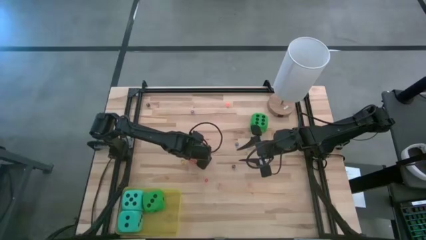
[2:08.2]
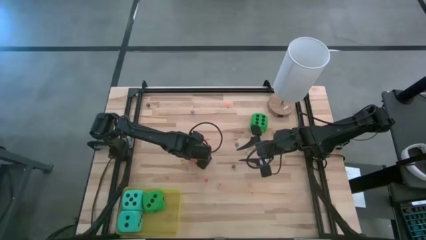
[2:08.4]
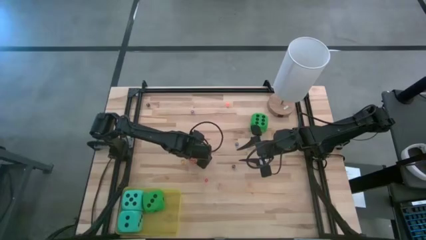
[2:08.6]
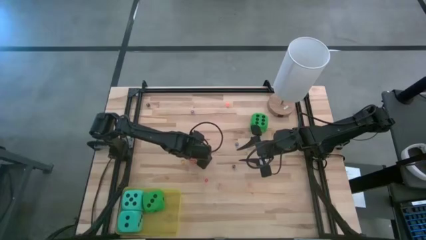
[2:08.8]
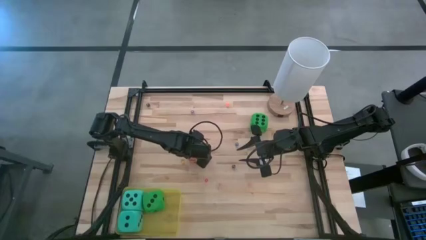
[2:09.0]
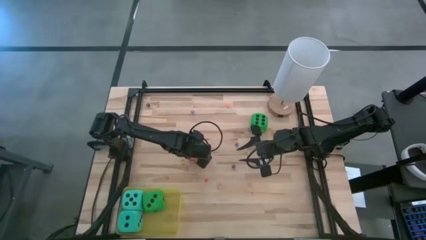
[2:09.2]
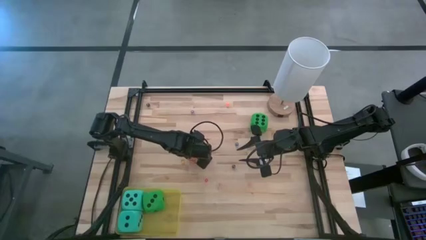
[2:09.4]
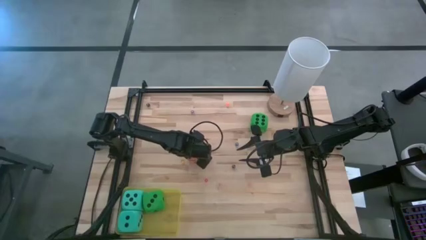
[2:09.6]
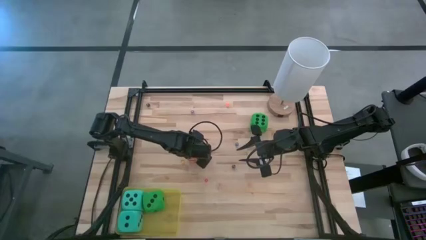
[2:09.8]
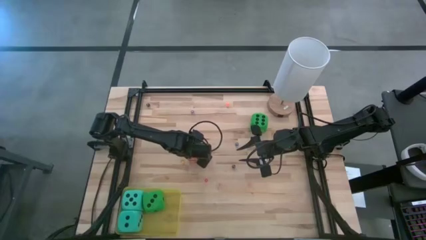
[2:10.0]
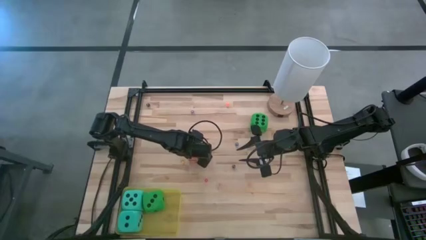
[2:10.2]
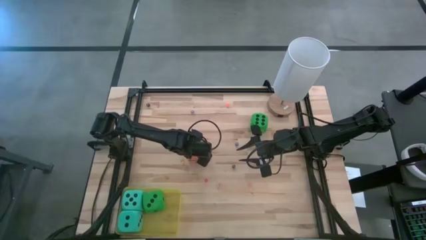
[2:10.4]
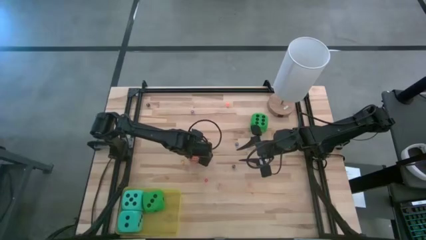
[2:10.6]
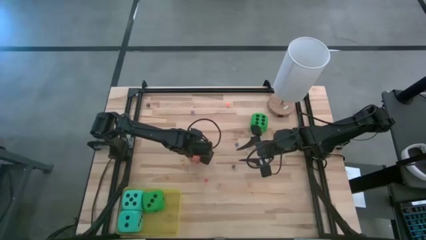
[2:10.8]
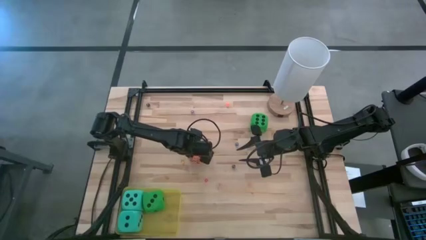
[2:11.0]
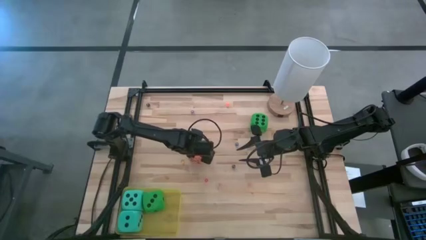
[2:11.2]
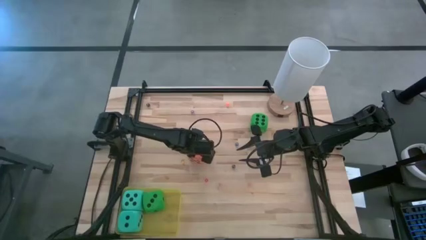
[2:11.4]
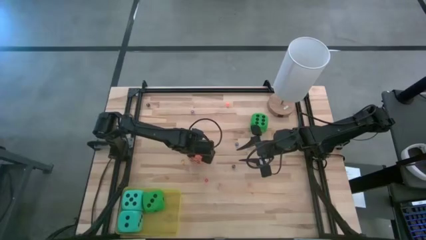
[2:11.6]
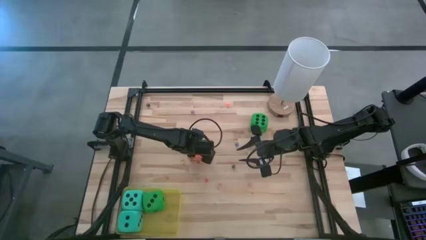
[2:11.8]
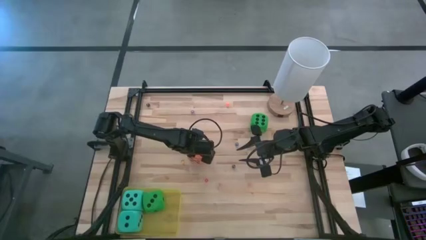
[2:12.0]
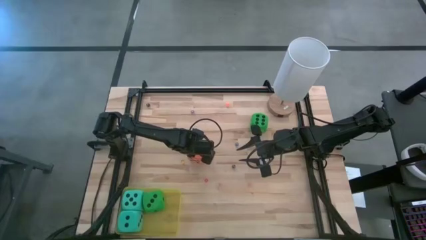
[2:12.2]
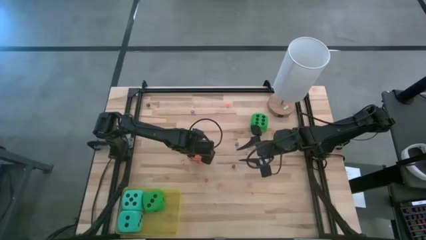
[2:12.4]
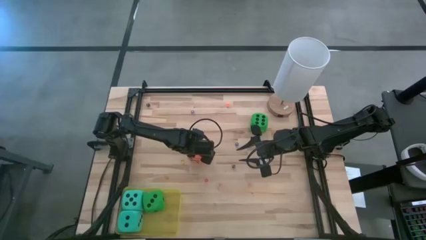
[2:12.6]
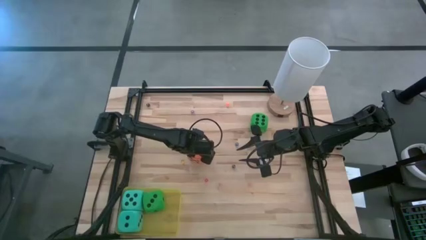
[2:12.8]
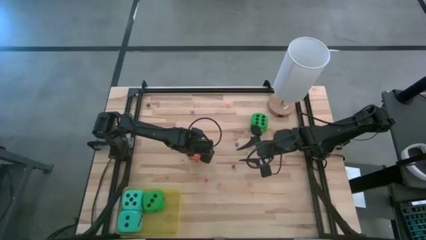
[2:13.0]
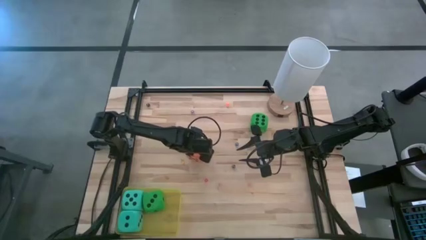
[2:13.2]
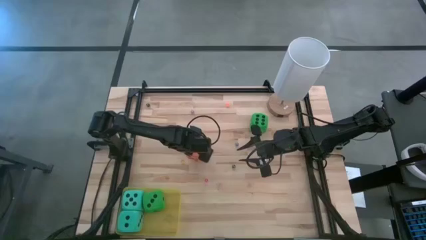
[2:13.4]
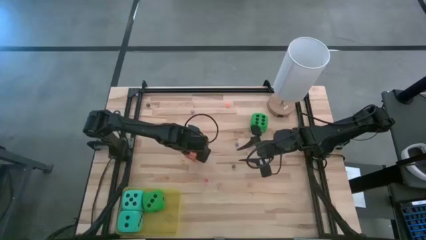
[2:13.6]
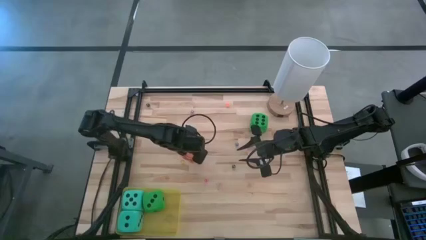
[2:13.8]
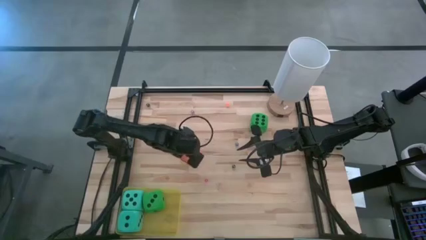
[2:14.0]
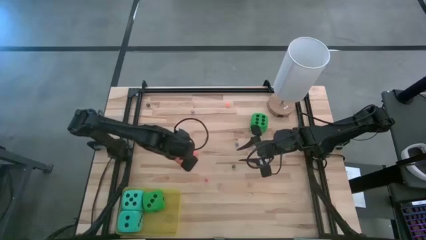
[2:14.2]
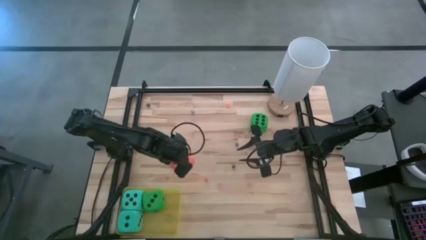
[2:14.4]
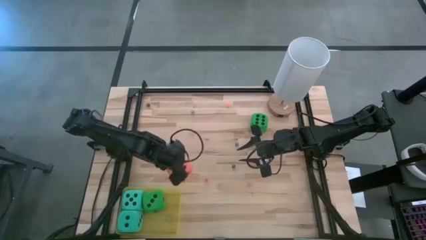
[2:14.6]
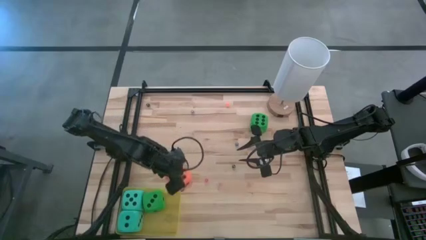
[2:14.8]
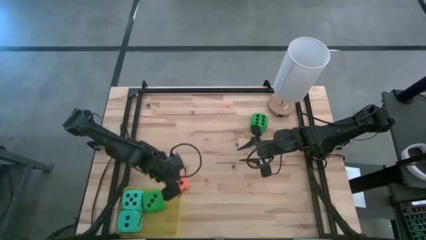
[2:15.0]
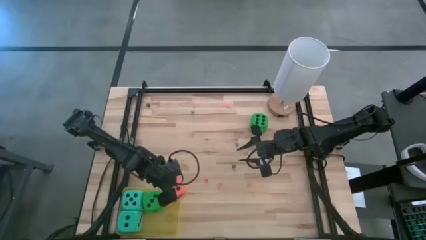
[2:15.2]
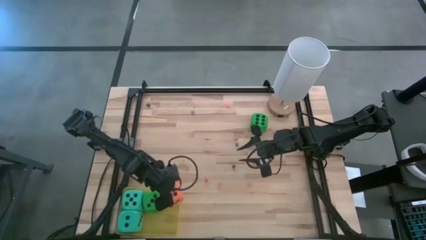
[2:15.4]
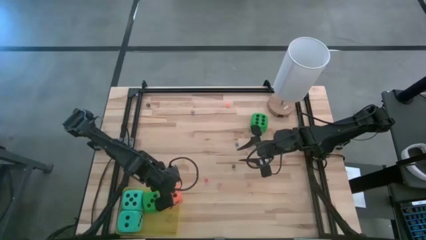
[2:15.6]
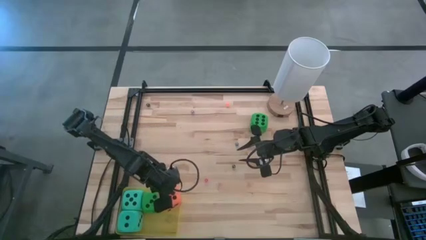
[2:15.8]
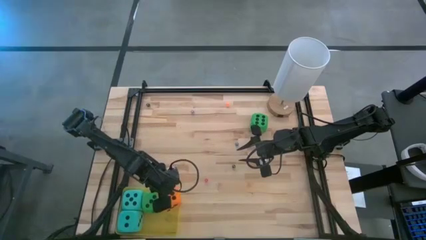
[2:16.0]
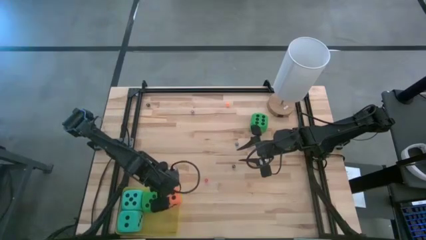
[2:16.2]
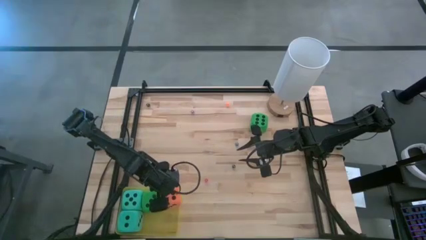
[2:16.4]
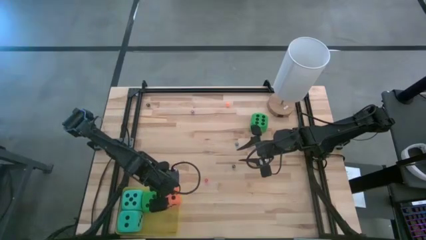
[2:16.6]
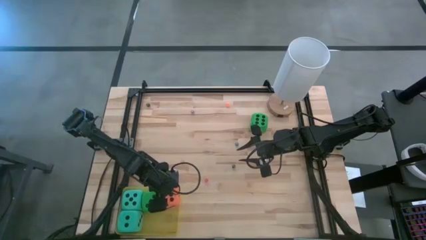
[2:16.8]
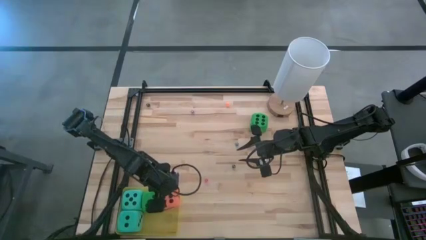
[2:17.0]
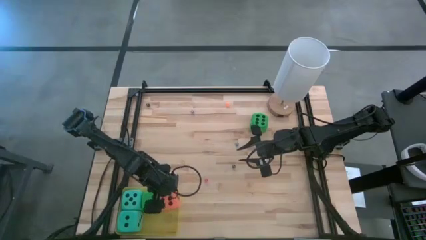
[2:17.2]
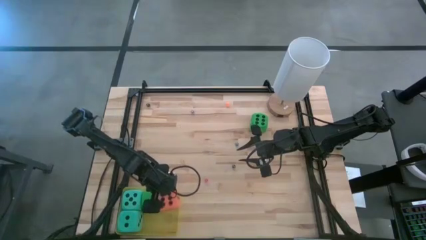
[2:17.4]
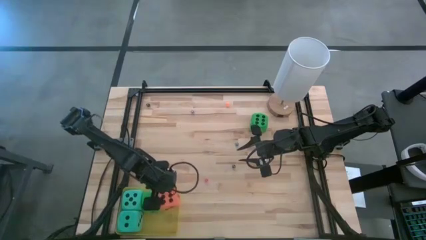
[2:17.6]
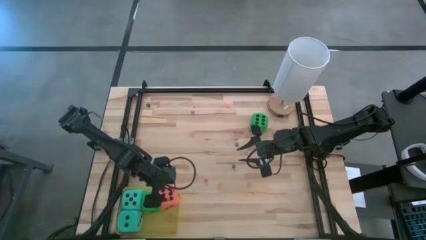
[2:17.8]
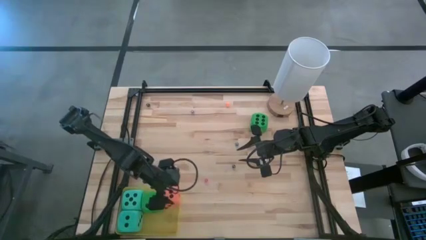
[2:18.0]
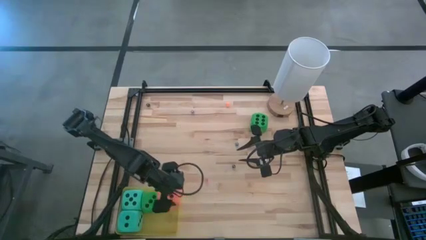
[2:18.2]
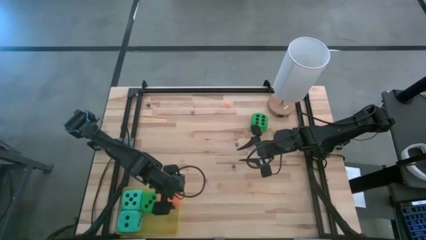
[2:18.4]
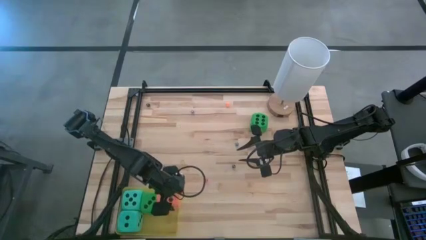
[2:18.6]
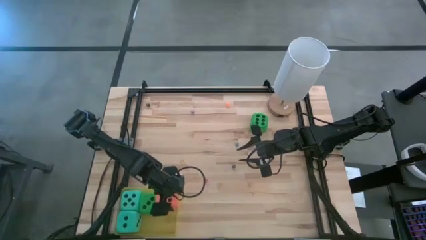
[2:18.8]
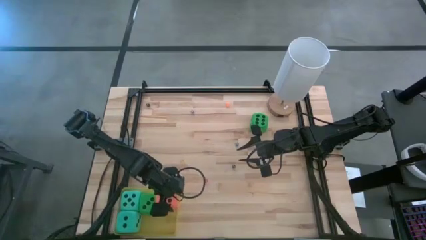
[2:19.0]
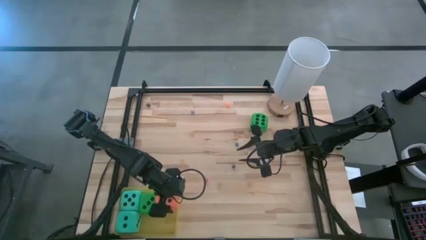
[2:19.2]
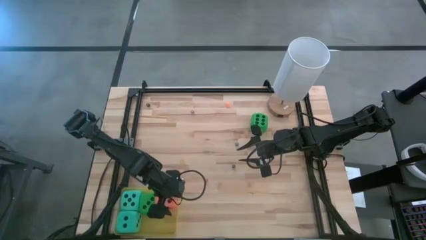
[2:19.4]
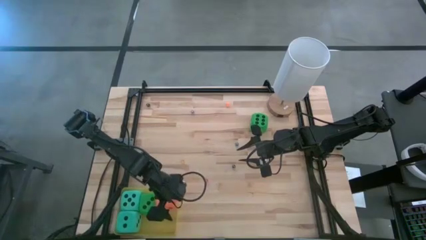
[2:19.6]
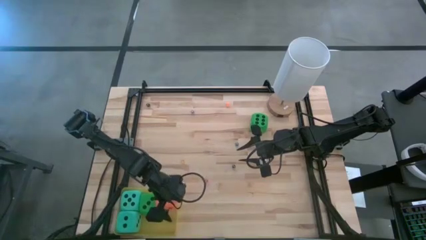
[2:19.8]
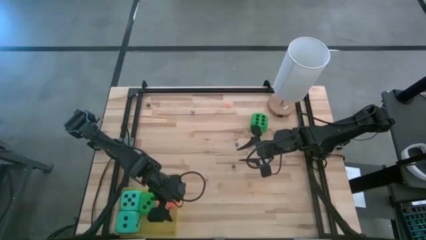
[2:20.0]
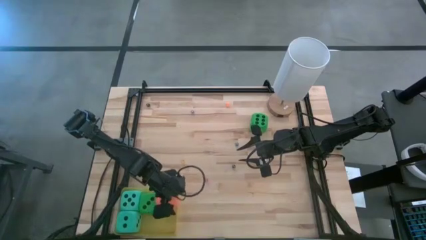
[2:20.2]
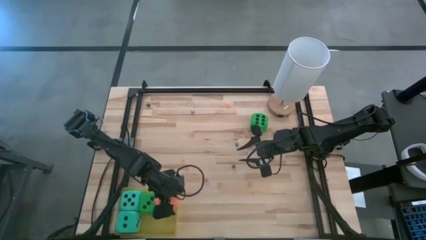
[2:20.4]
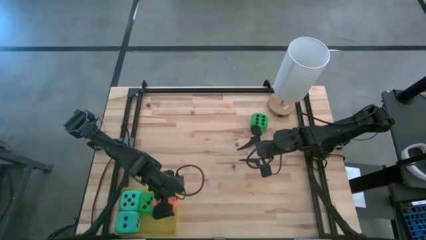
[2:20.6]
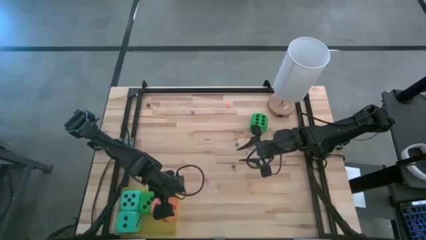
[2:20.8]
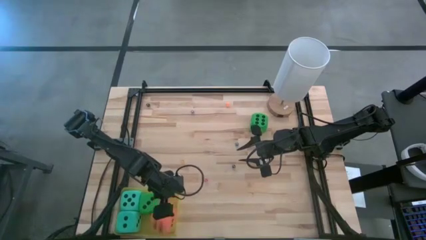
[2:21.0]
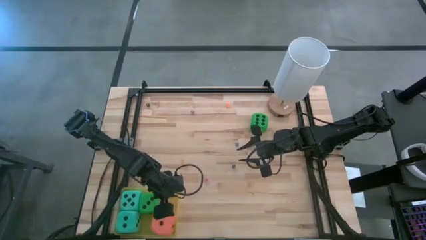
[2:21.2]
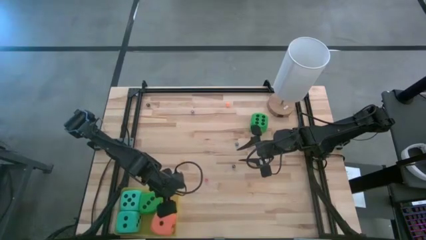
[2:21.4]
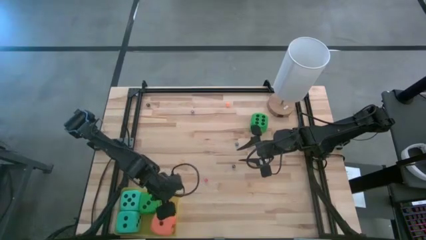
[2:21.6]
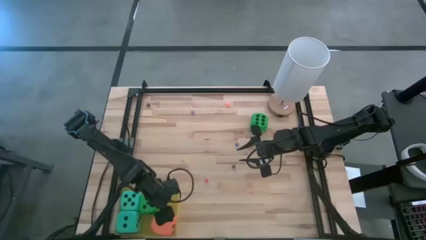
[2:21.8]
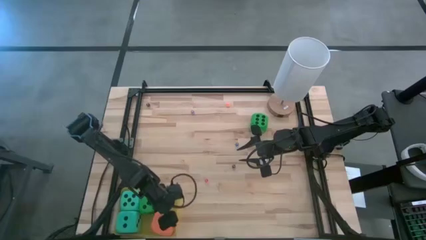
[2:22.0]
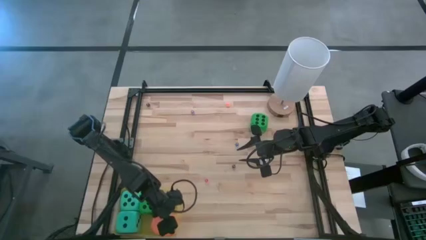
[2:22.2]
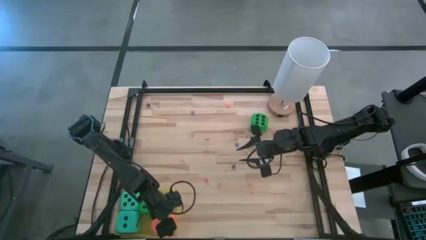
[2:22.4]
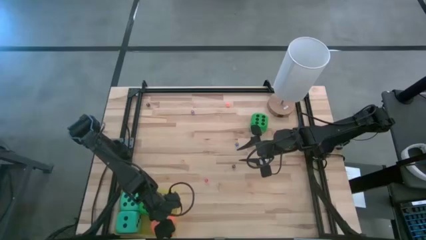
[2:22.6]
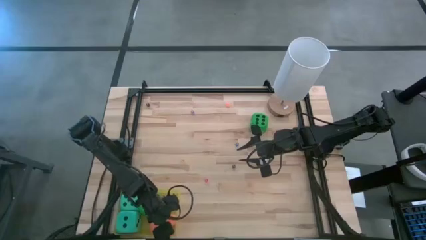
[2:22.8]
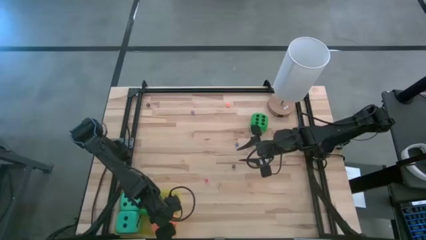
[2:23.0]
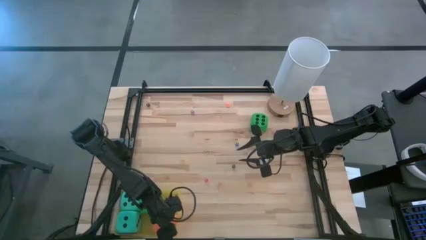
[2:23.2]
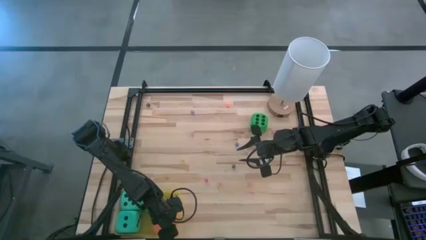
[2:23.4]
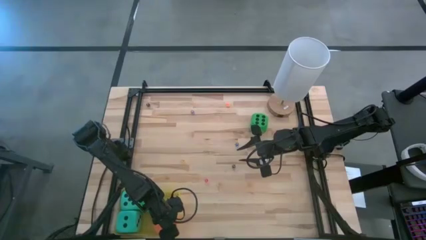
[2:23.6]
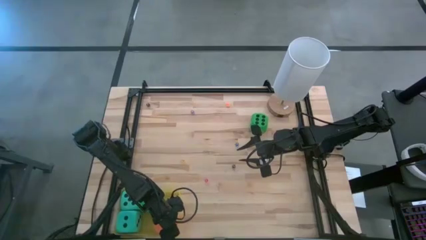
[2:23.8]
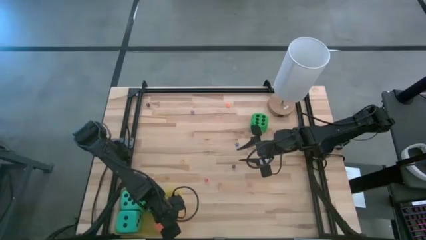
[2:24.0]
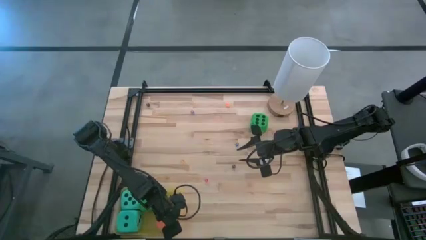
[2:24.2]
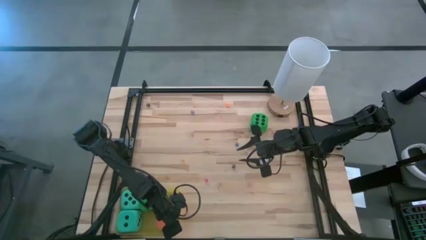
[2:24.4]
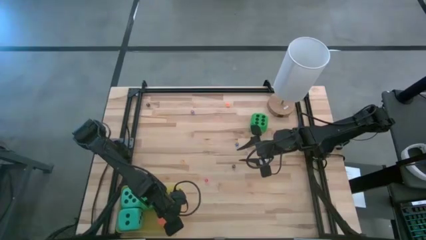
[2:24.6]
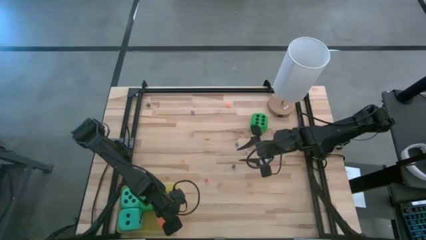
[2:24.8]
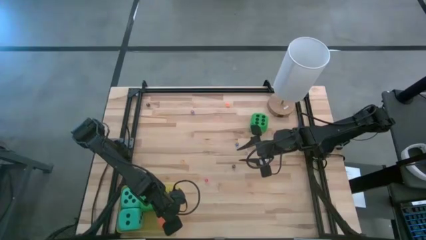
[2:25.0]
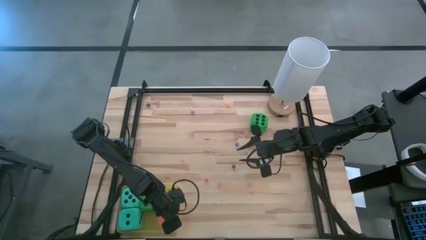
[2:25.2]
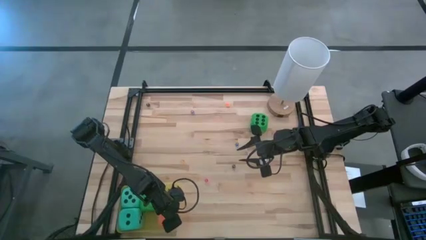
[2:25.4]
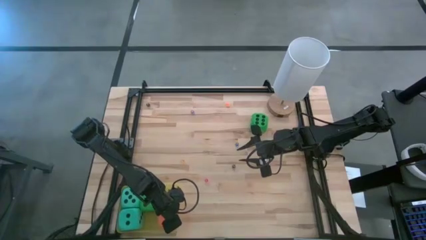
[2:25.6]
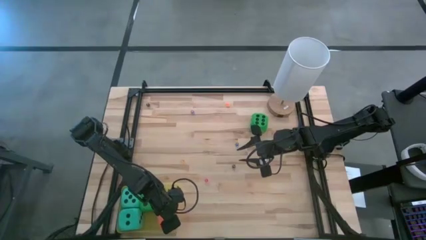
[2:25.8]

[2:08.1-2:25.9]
Task: Pick & Place Dice
Put the large orange dice into the yellow bin
